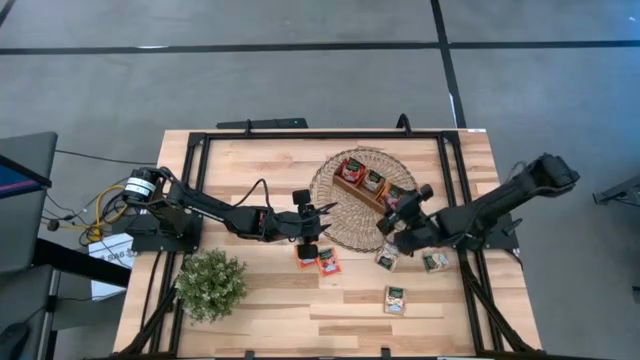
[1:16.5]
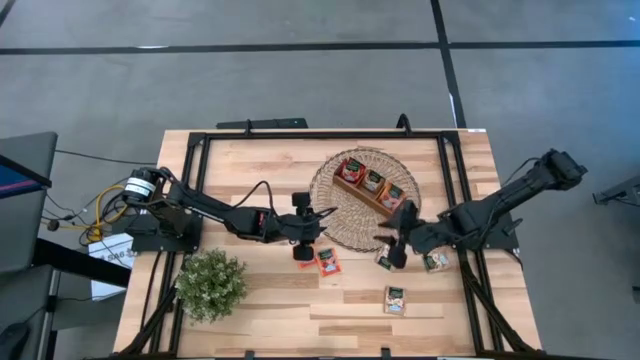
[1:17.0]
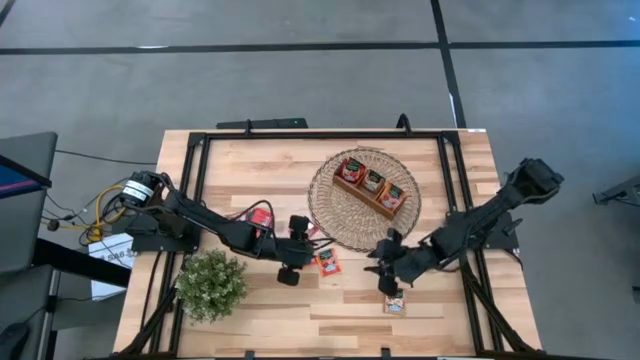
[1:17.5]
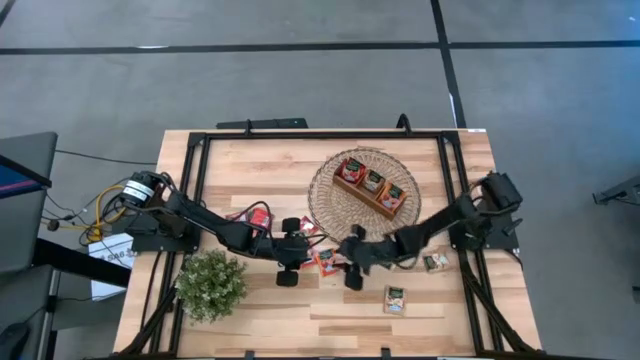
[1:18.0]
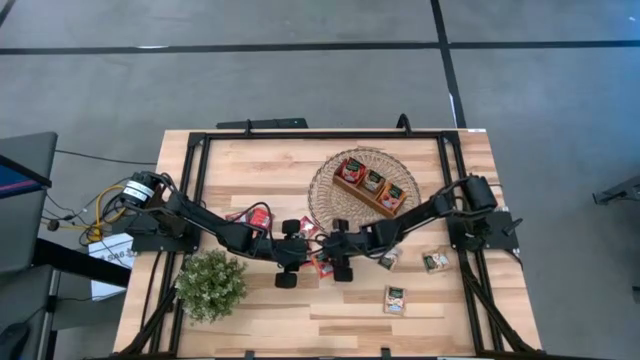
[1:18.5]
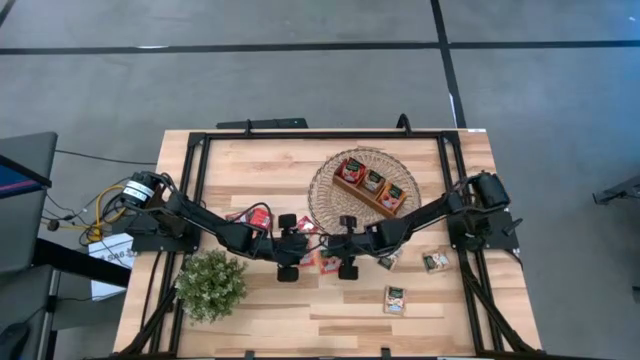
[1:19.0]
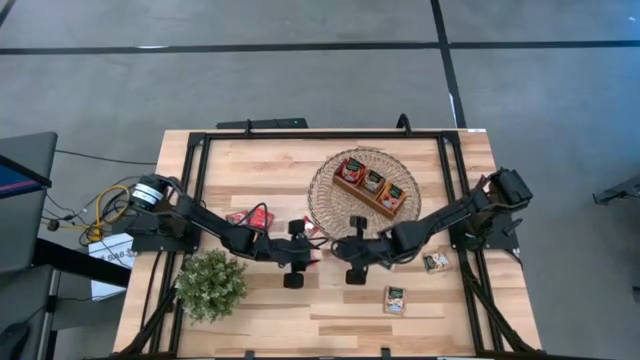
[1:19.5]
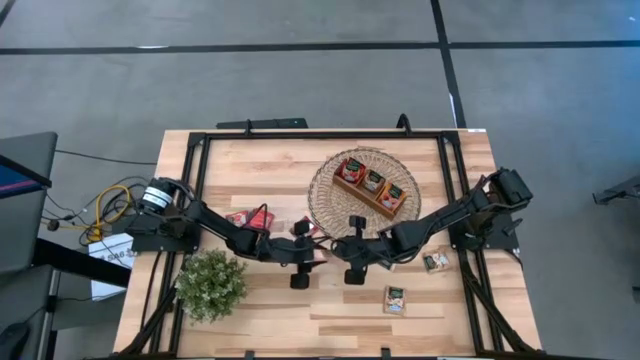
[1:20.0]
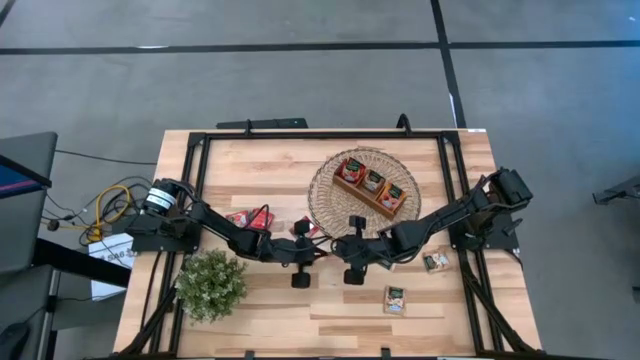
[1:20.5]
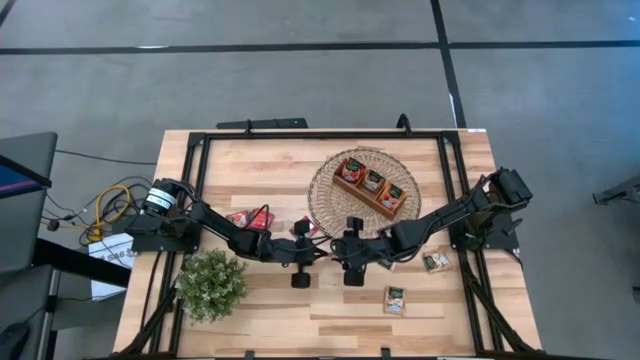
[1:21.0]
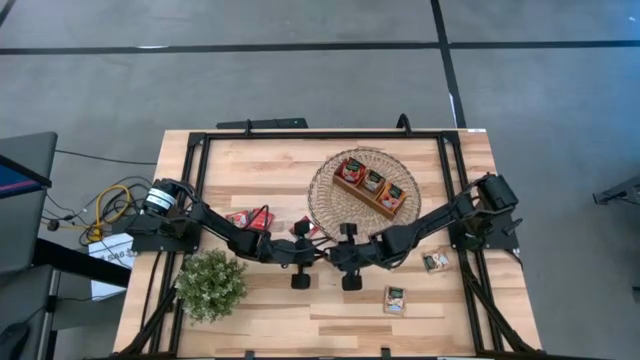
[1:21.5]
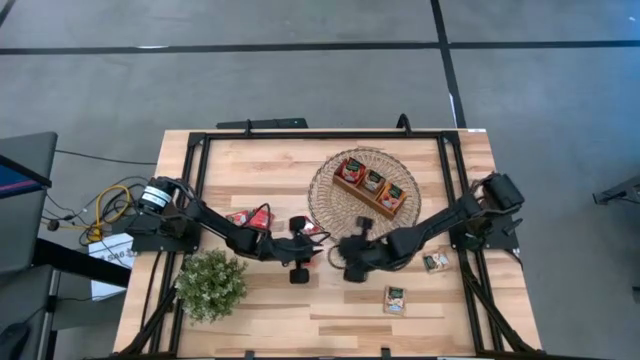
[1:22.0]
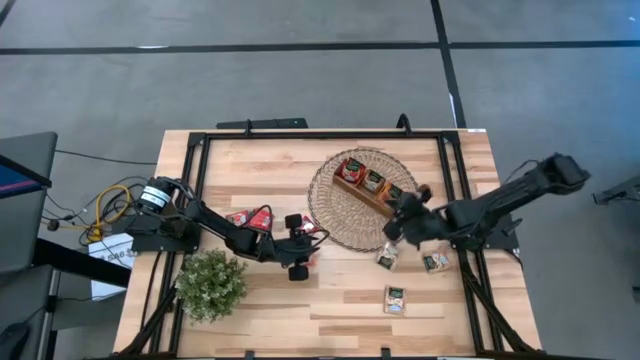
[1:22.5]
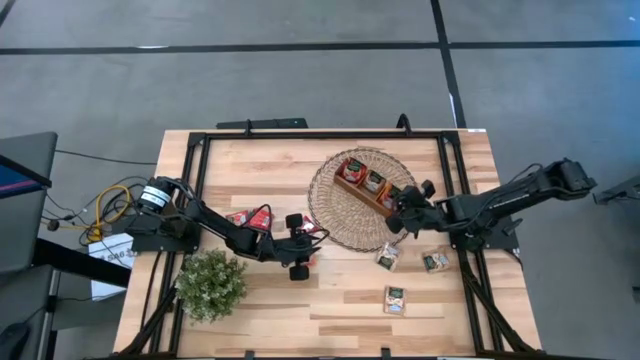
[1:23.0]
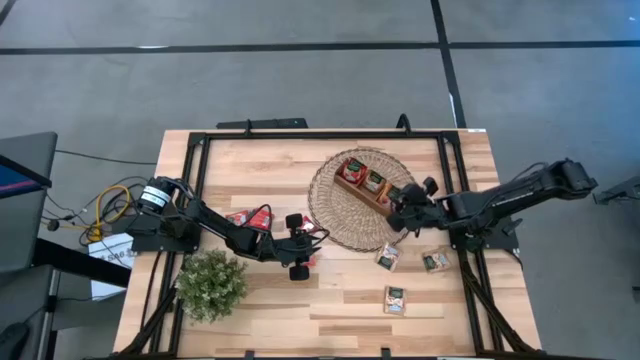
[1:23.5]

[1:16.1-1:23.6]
Task: Pick & Place Tea
Put the orange tea bag into the right section of the wooden organizer

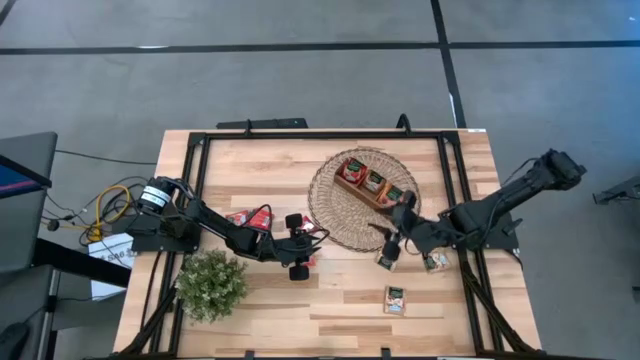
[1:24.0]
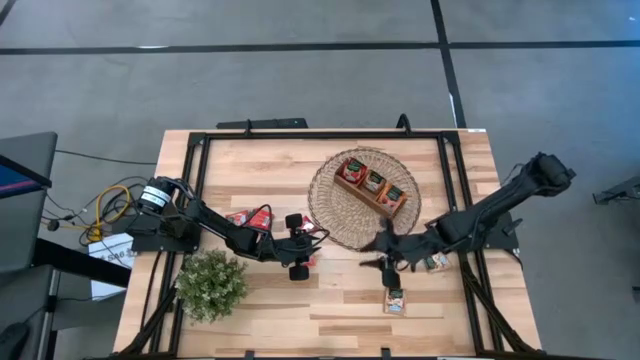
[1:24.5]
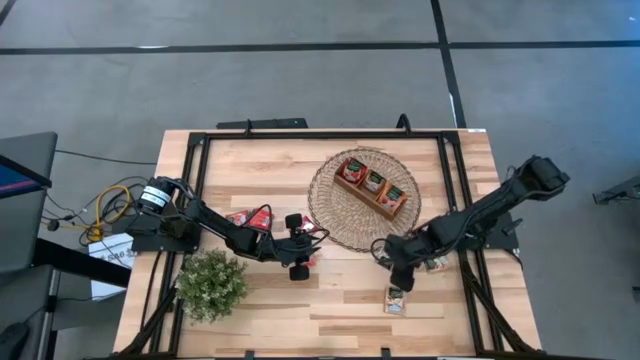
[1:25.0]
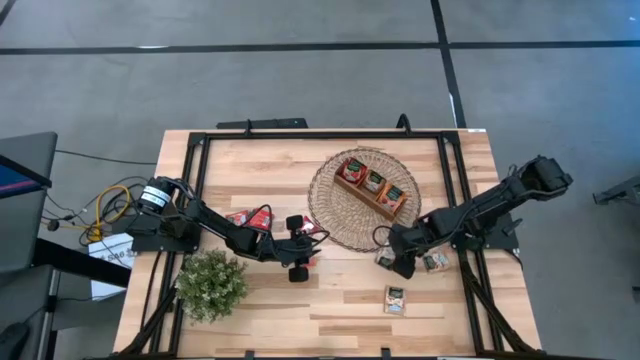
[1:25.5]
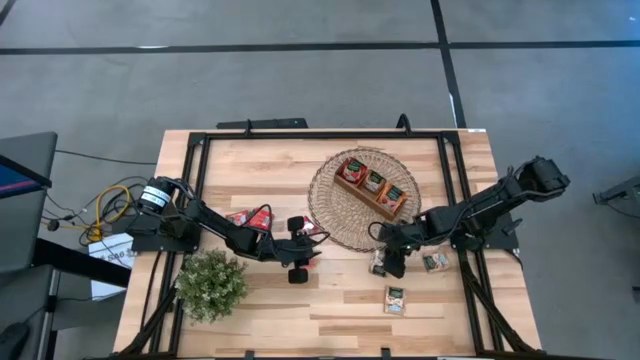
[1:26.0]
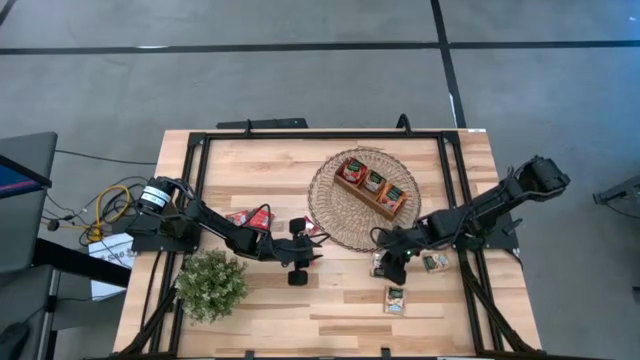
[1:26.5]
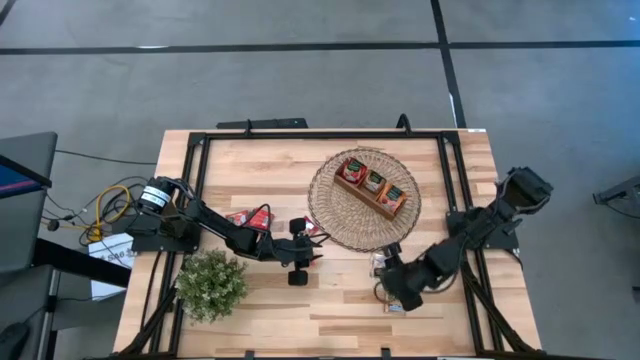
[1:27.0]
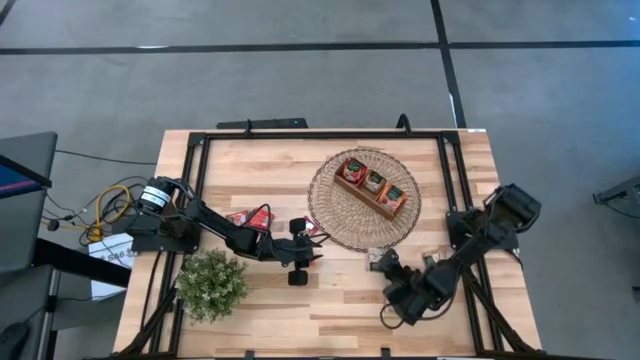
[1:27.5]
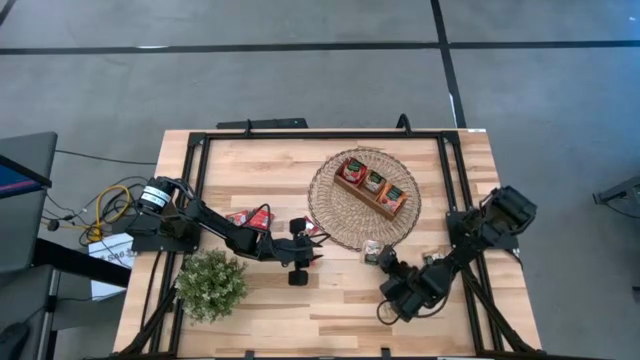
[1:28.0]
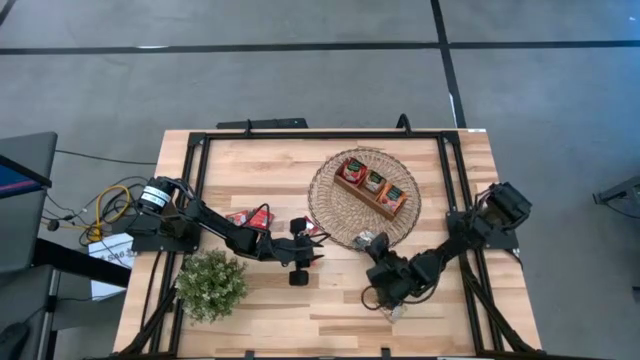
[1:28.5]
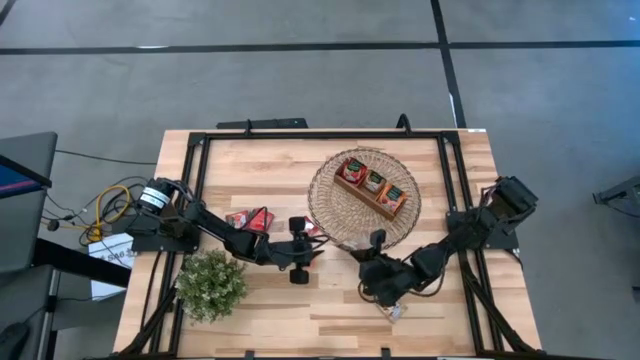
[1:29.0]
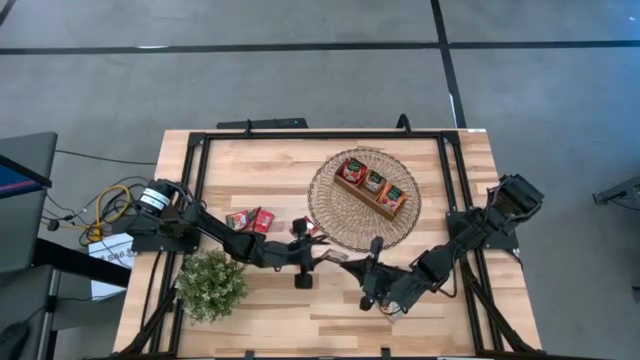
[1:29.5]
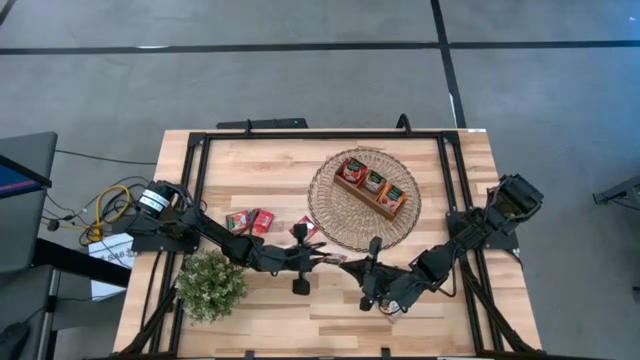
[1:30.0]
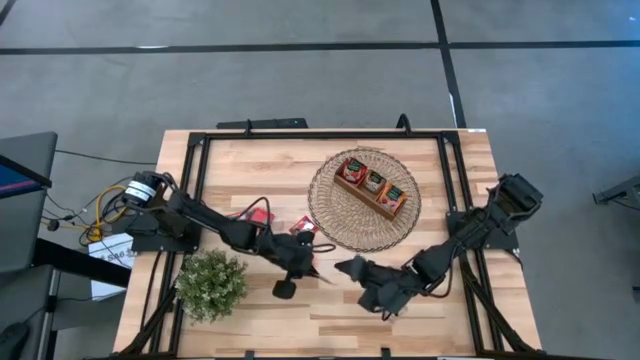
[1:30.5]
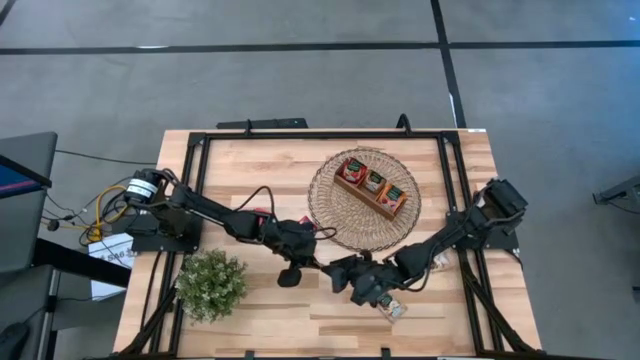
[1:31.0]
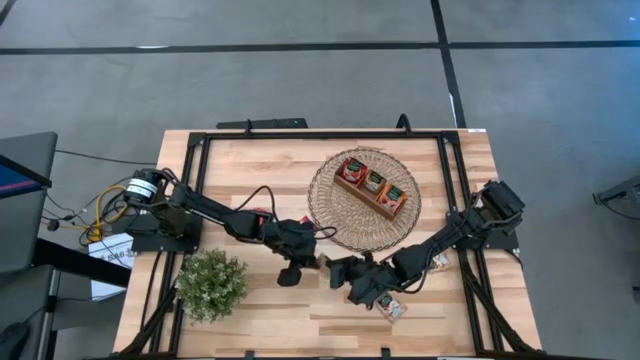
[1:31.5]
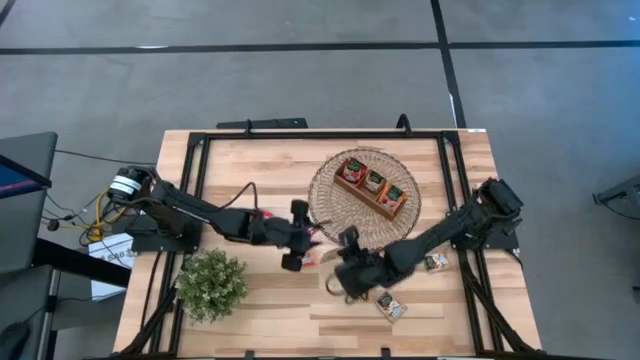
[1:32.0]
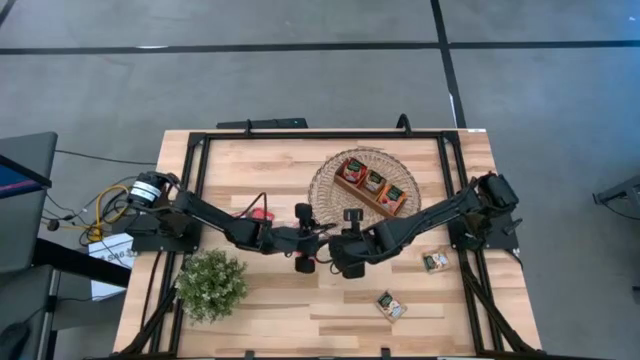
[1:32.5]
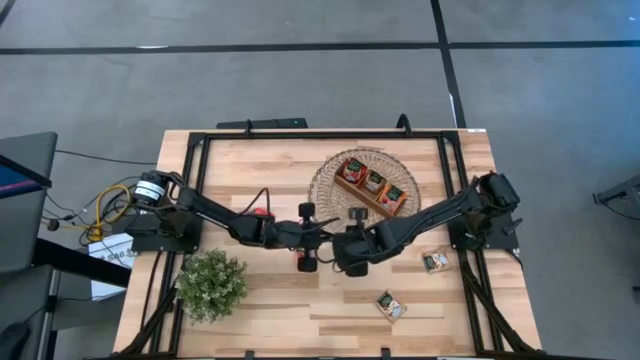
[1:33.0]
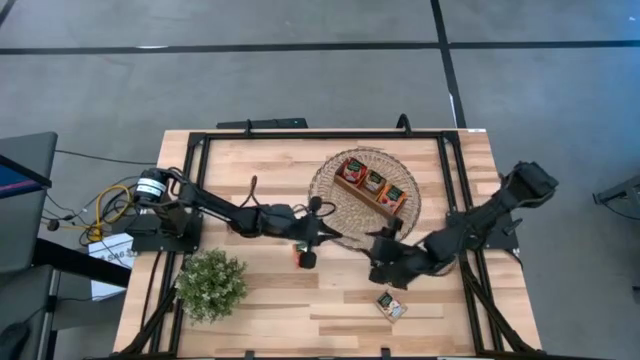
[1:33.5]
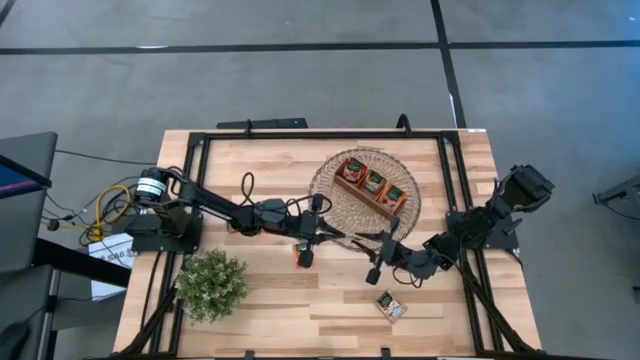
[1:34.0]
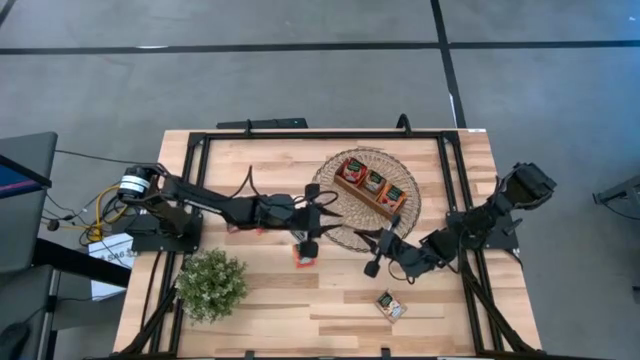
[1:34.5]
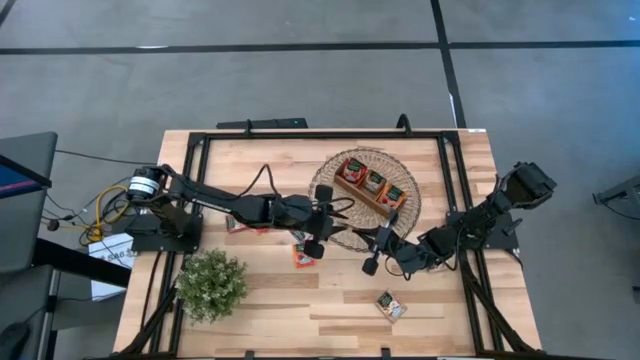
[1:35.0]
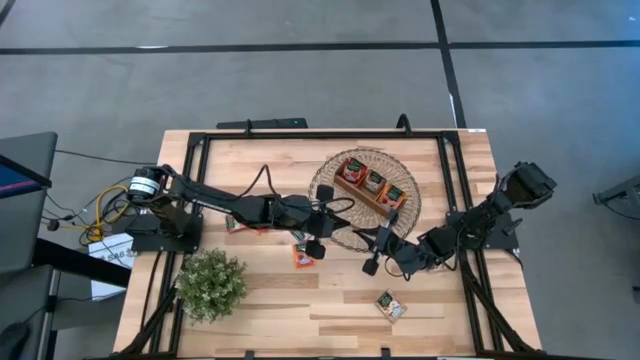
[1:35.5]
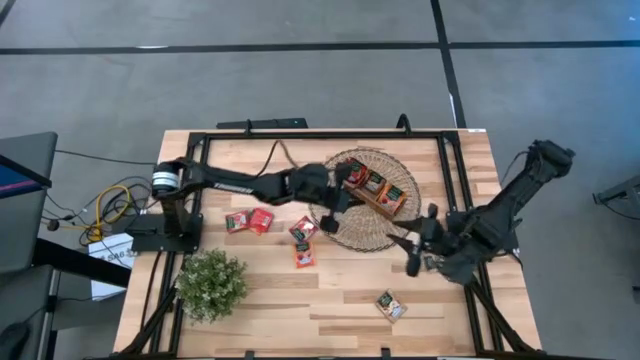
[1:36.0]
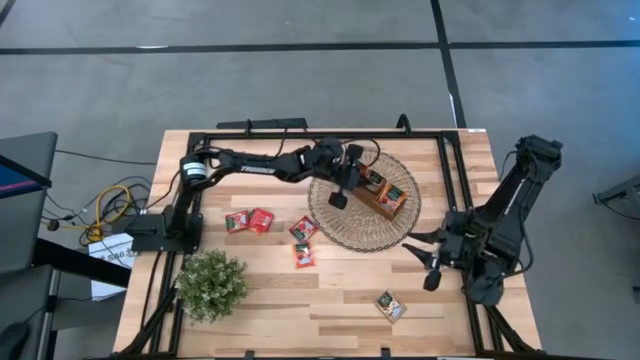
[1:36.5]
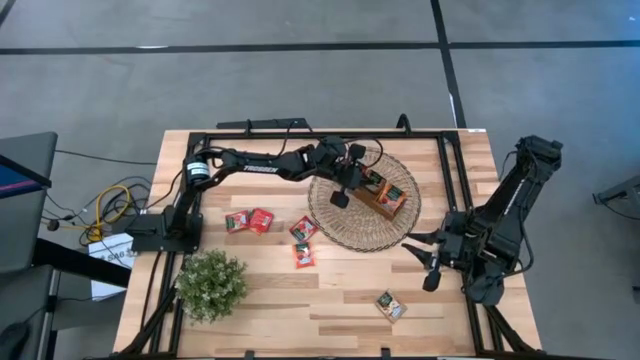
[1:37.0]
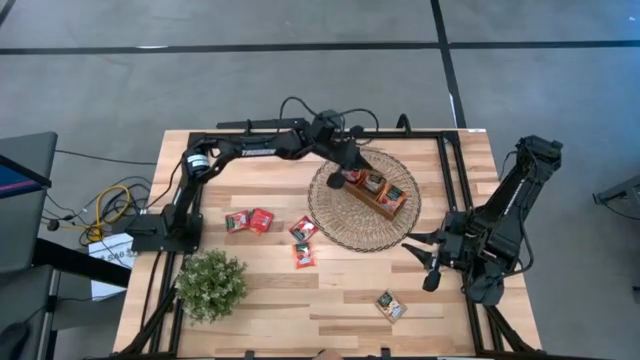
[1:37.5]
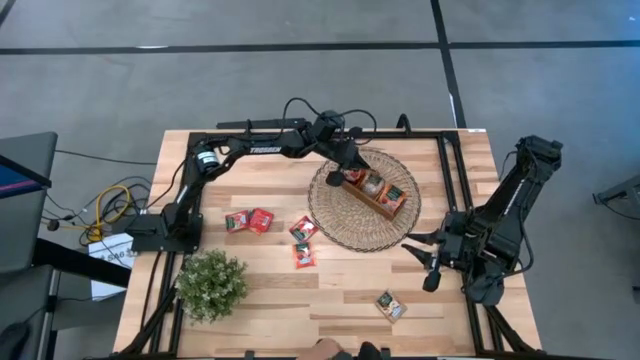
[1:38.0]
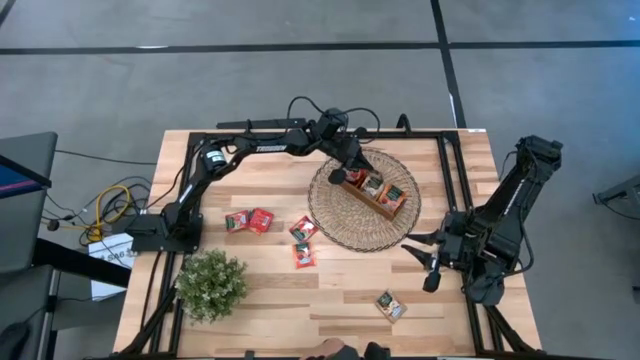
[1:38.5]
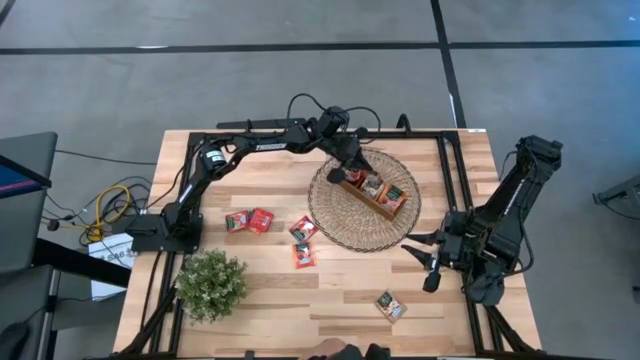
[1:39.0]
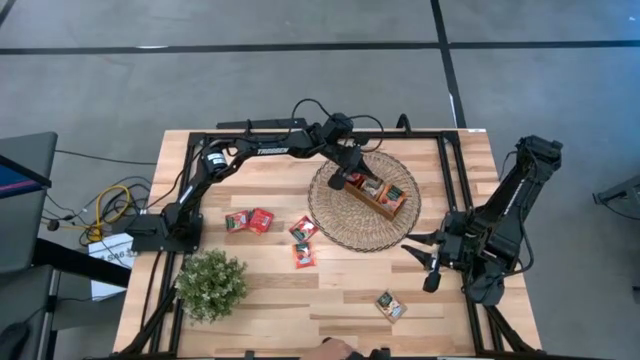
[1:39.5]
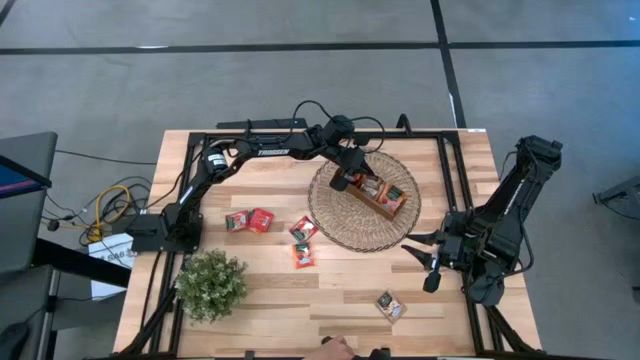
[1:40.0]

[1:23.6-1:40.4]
Put the brown tea bag into the middle section of the wooden organizer
